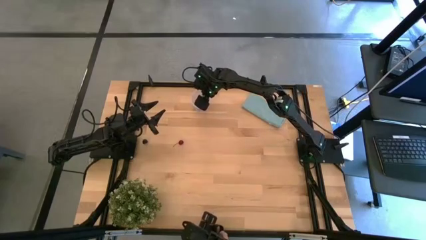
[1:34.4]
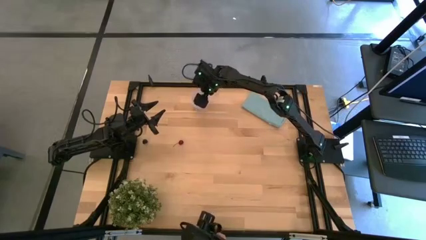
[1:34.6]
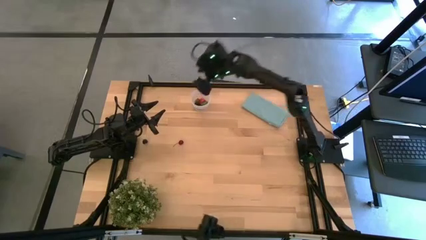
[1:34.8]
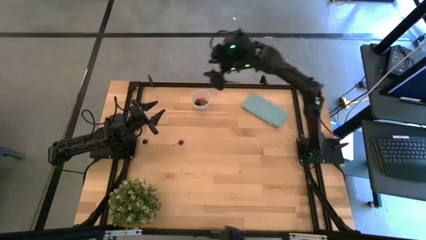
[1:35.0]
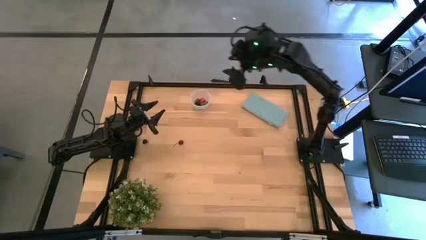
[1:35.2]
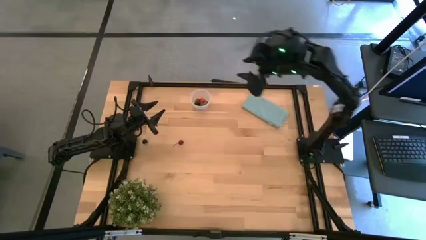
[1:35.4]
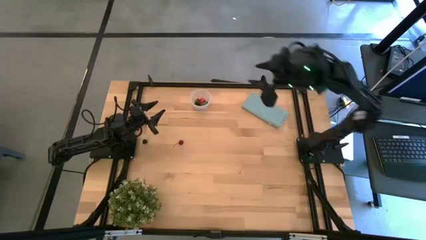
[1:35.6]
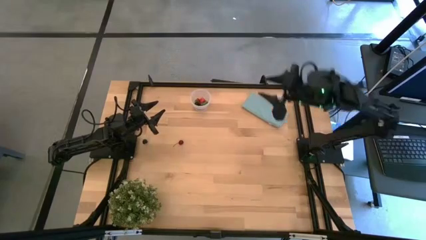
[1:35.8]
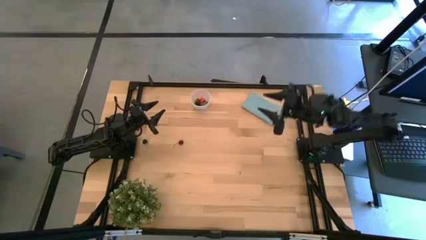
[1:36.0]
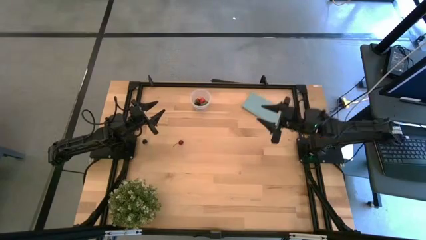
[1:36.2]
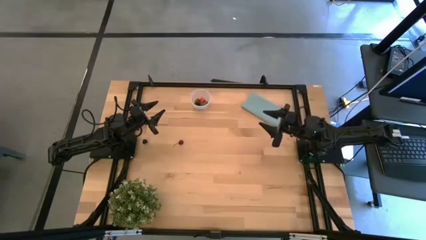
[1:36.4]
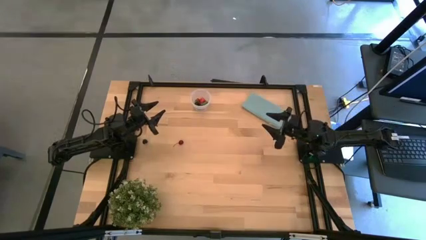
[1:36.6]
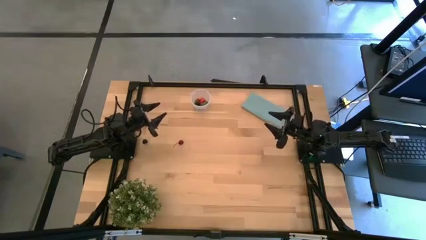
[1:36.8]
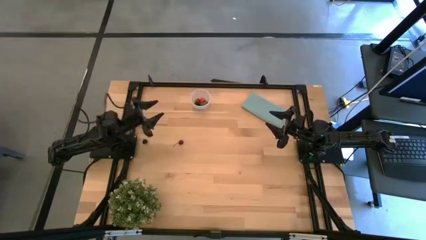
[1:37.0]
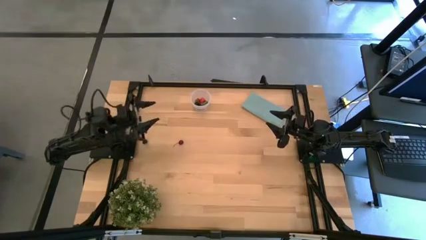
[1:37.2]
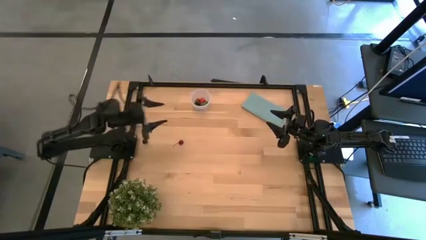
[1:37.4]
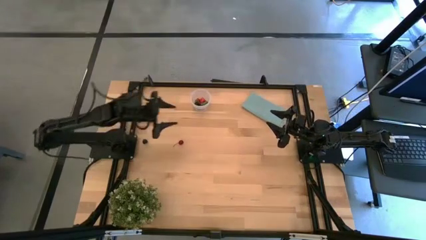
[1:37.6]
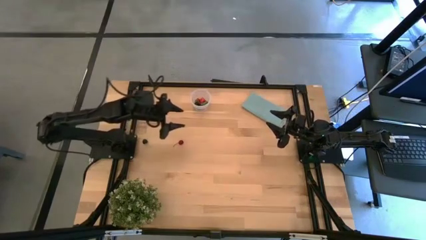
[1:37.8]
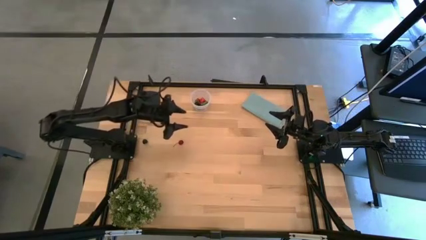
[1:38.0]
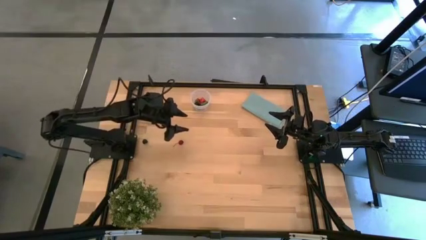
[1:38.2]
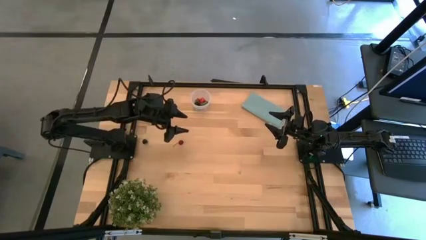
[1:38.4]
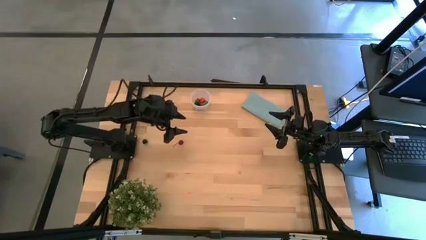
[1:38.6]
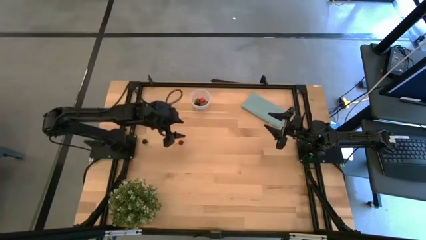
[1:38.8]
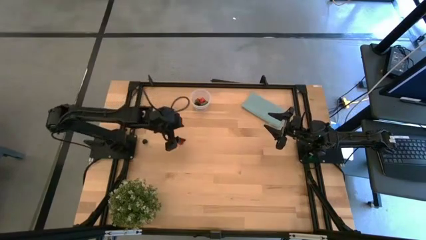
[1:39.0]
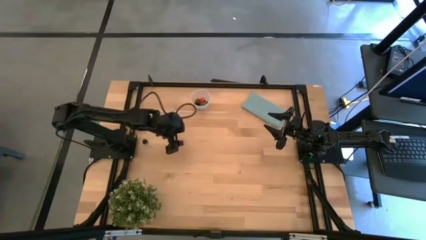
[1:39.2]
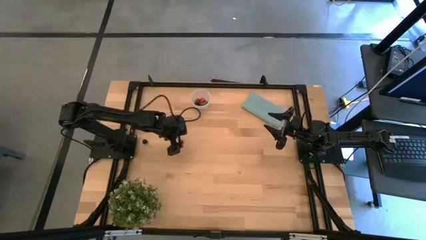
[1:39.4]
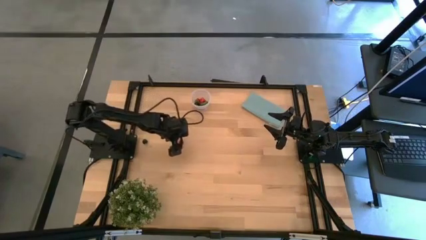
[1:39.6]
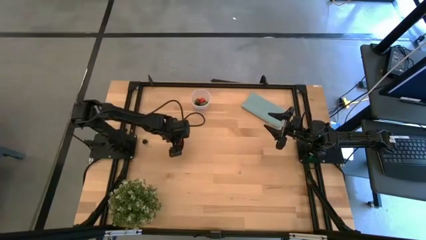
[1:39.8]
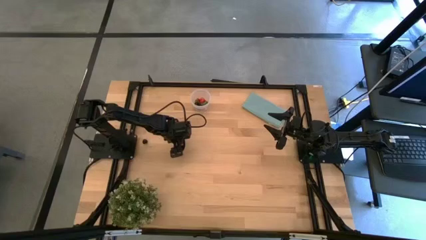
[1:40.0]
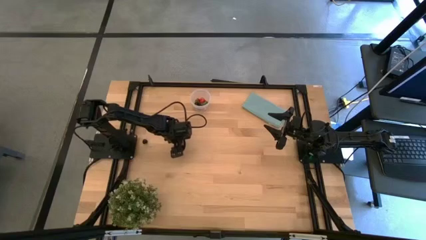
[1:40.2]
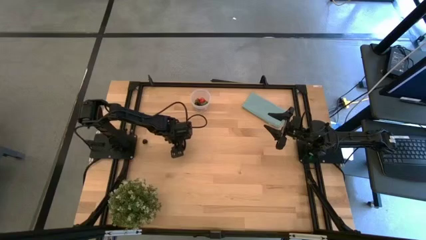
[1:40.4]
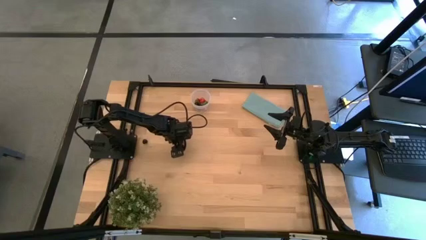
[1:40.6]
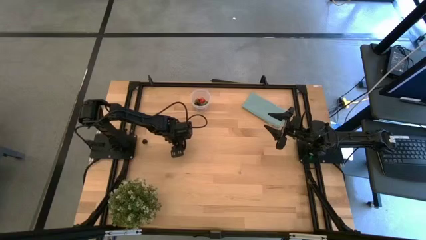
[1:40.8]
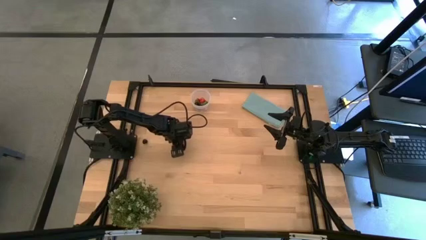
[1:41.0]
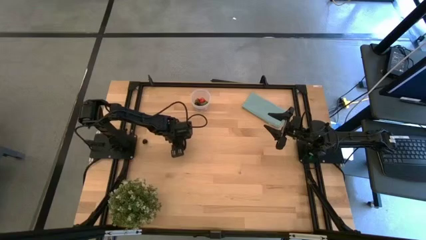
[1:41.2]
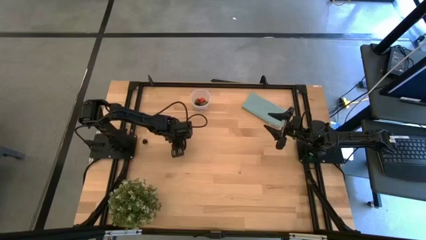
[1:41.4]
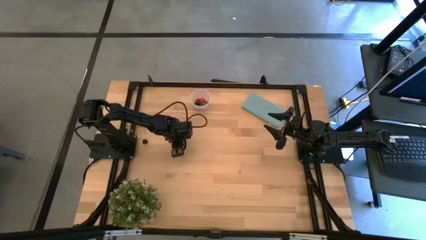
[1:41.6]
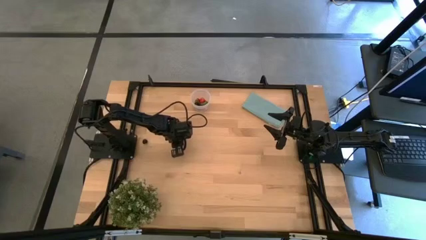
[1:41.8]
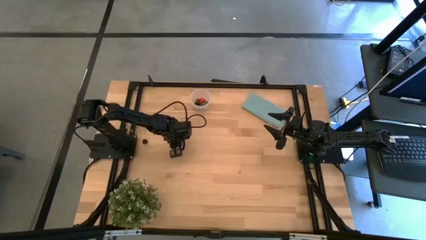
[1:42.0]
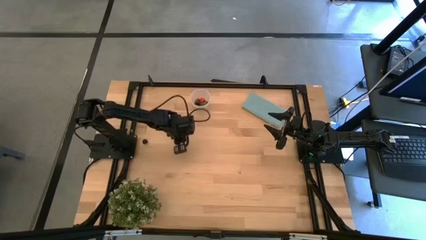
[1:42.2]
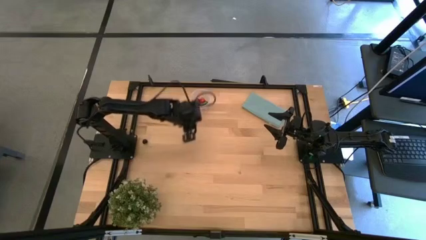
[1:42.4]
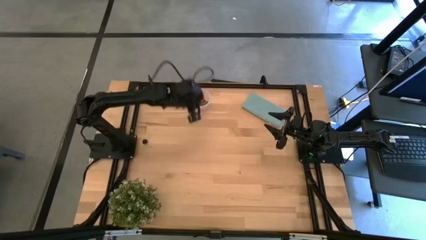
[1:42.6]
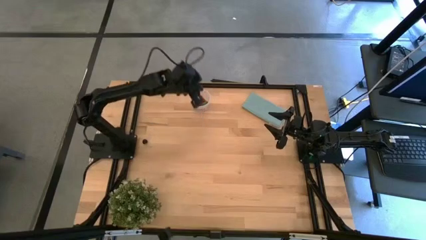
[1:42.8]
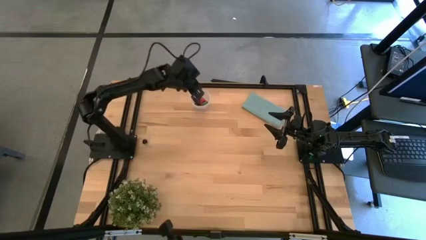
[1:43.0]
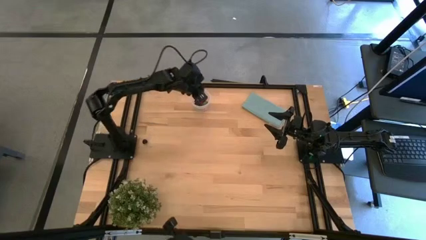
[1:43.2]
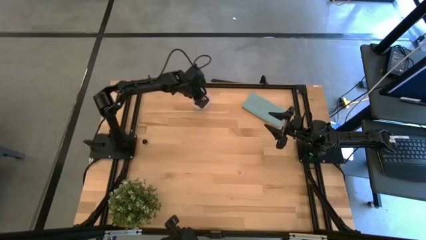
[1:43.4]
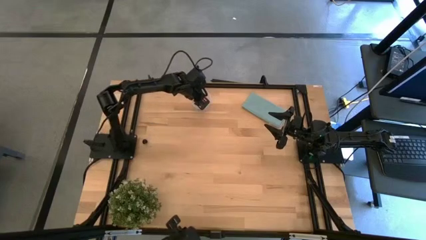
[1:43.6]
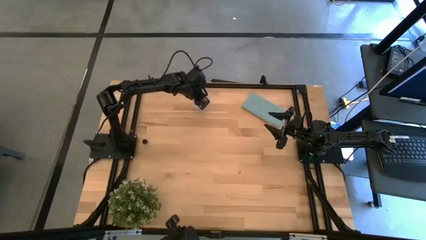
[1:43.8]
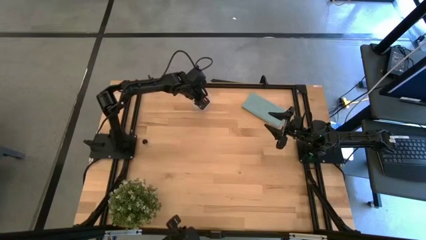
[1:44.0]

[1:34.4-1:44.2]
Task: Pick and placing Produce into tupperware
Put the red cherry into the transparent container

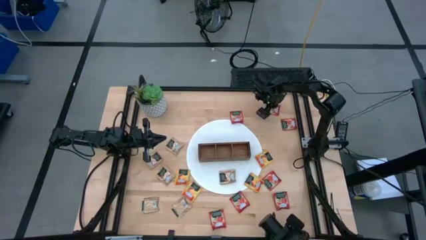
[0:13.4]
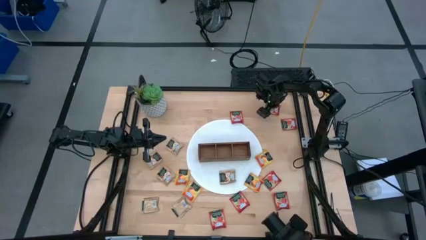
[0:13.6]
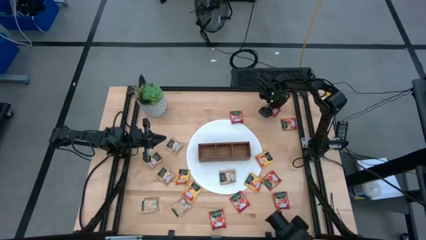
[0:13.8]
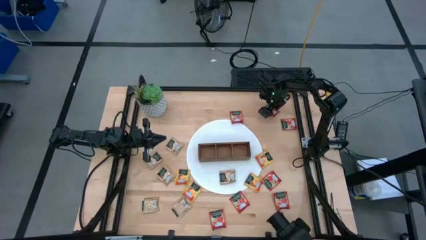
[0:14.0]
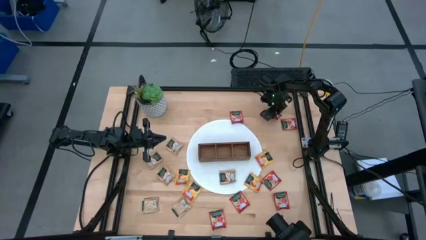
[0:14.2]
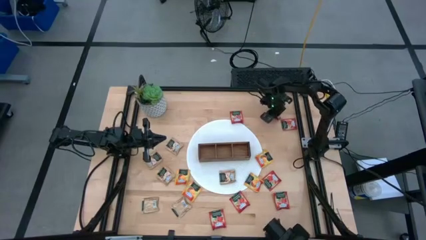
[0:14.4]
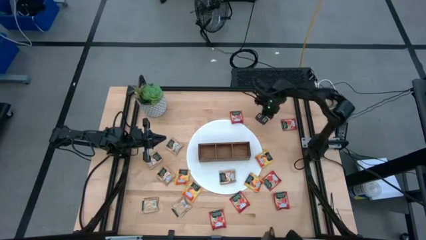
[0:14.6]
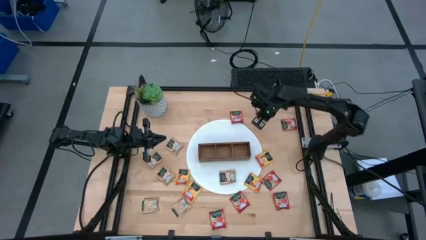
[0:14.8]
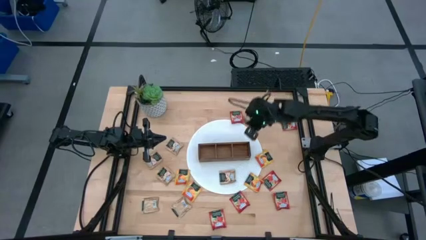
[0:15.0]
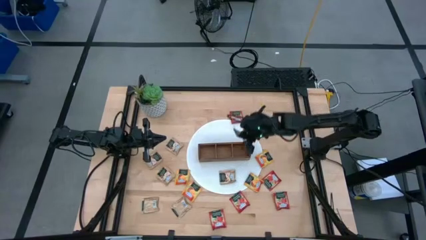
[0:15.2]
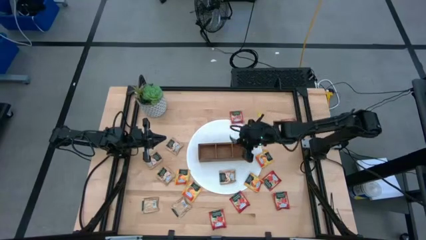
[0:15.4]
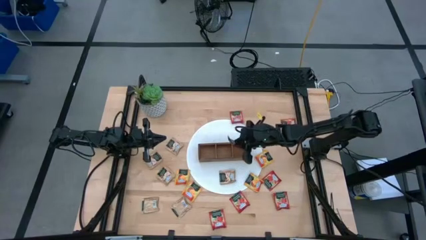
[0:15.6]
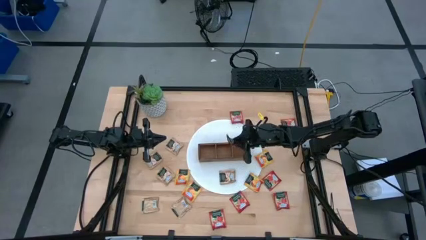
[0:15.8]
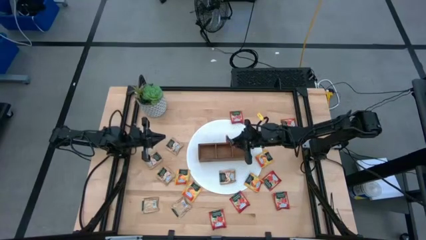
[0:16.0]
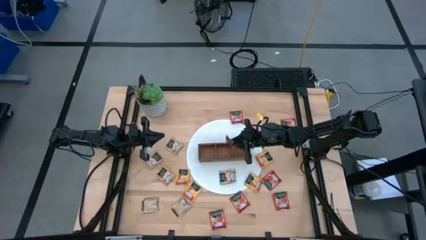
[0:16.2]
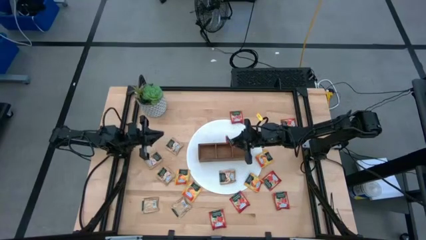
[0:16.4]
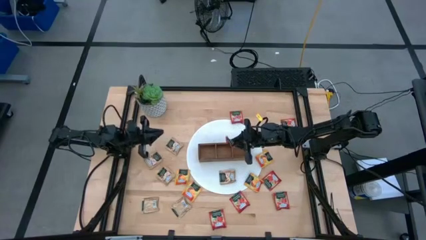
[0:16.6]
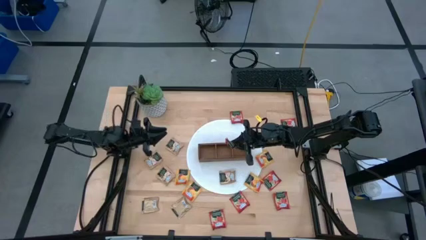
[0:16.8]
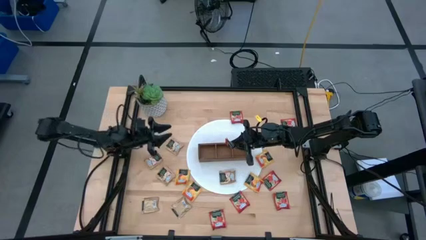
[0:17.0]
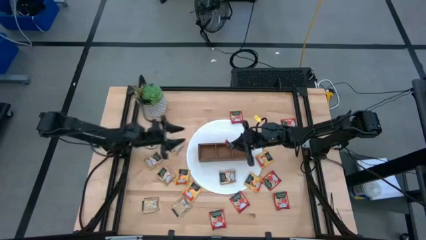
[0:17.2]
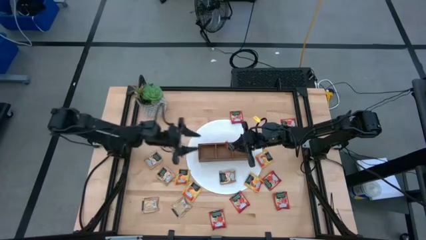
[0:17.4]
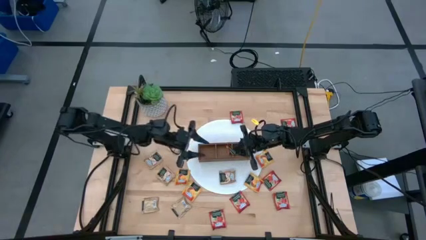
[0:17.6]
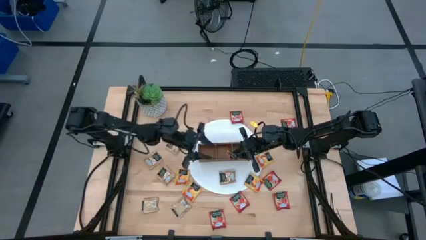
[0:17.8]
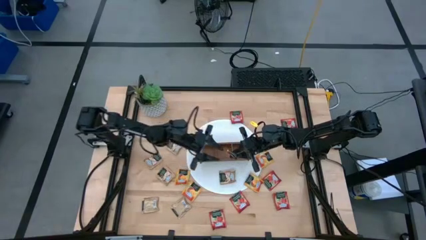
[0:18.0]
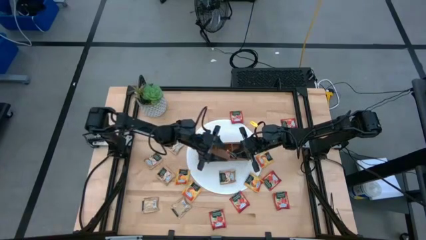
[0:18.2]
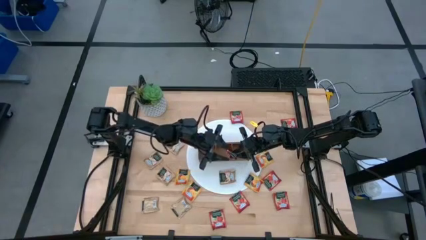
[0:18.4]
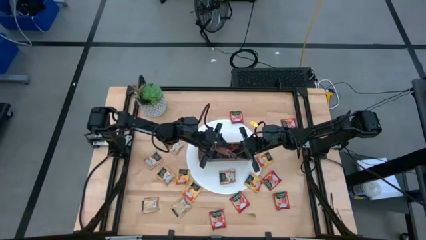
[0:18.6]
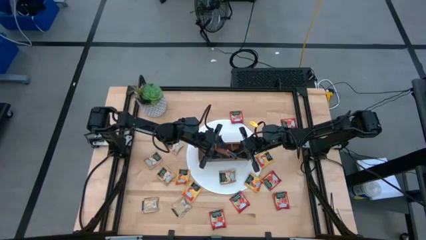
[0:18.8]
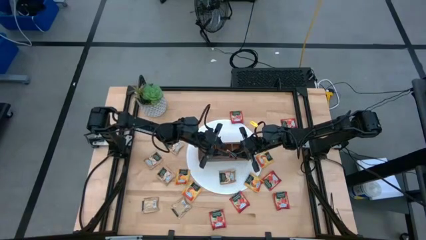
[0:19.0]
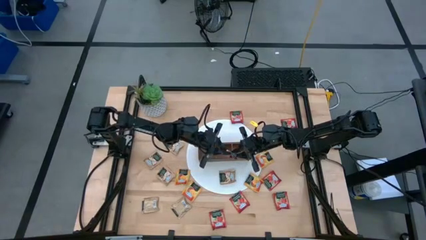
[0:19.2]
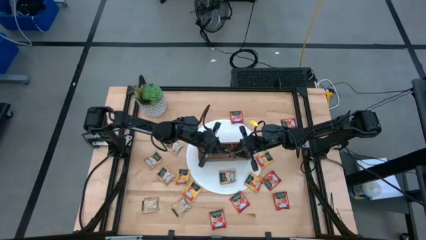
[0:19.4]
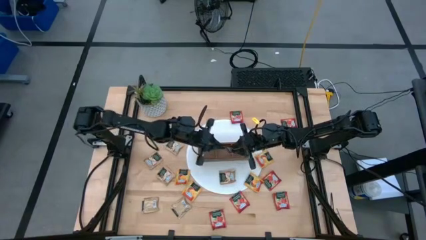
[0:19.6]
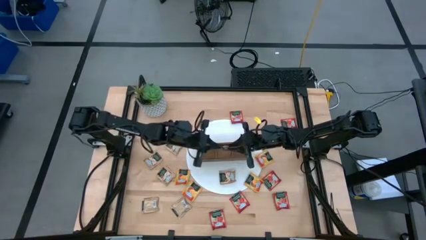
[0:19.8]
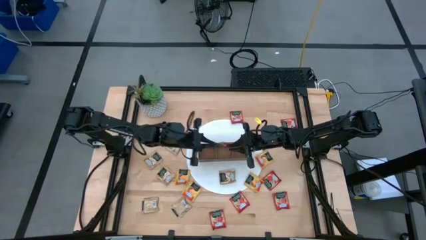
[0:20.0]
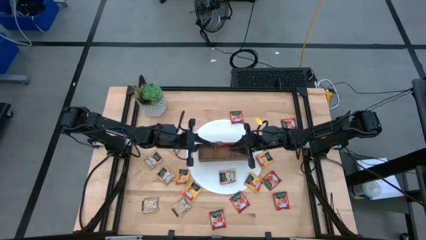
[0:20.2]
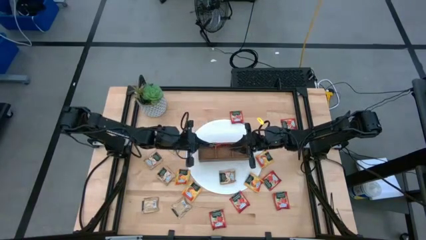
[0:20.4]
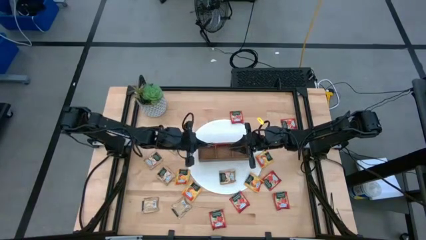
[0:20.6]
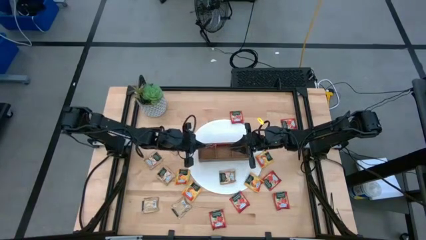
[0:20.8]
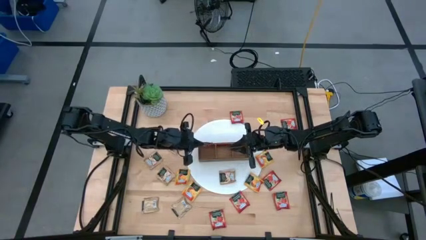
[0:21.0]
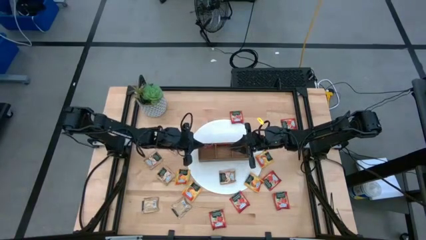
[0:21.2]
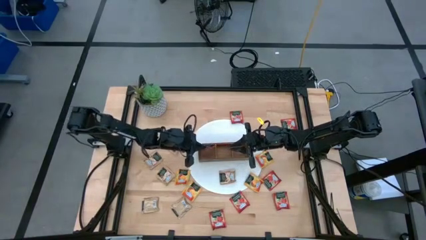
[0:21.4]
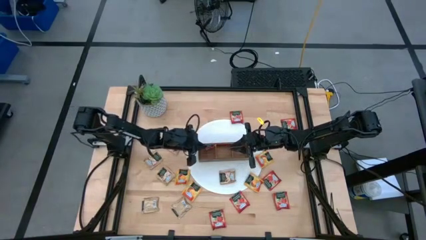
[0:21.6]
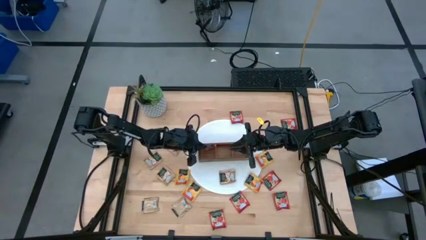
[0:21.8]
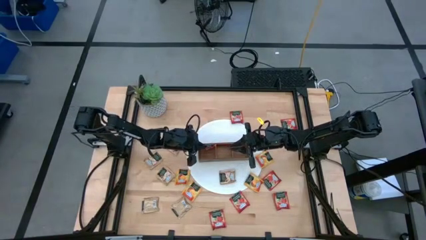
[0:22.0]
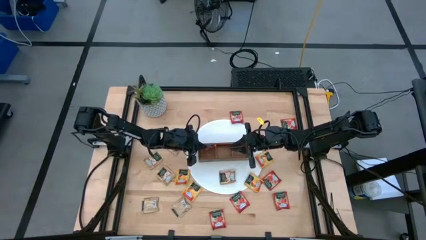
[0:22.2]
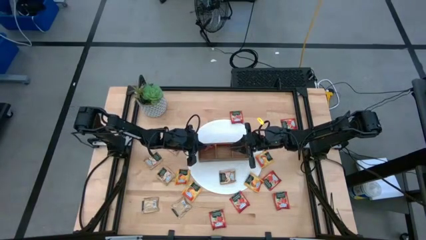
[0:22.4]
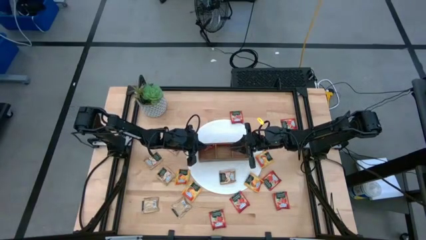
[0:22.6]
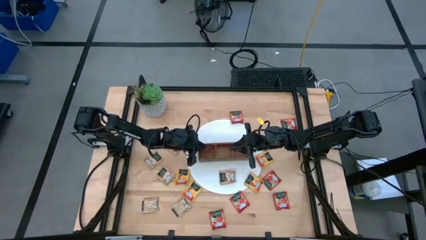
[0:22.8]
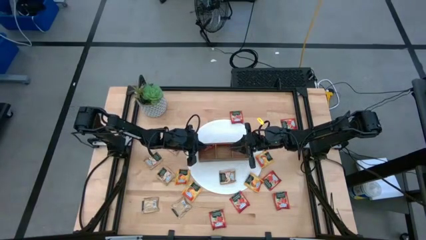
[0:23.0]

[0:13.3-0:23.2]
Task: Pick & Place Tea
Put the red tea bag into the middle section of the wooden organizer
